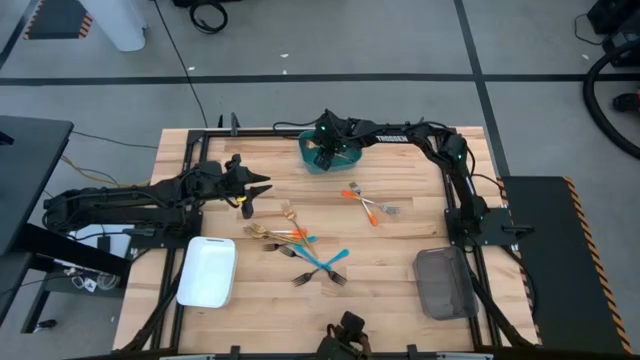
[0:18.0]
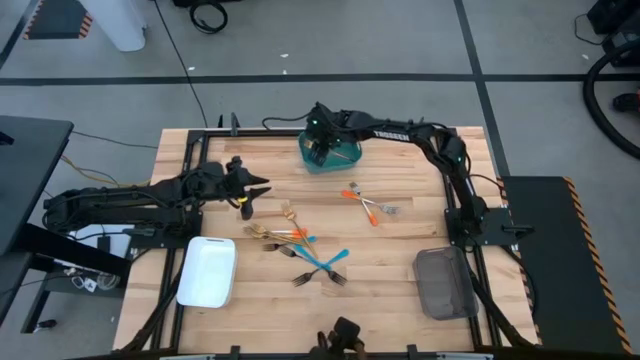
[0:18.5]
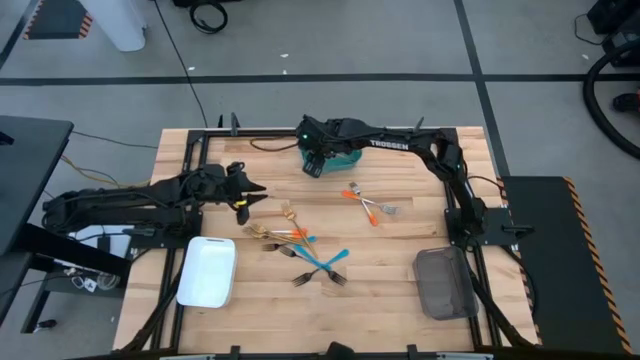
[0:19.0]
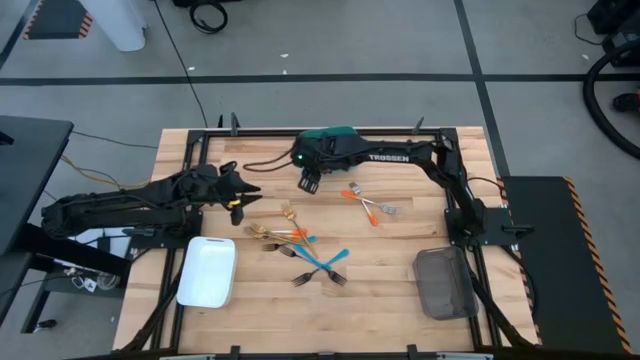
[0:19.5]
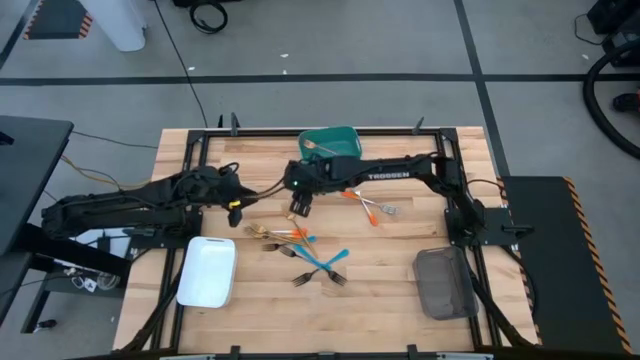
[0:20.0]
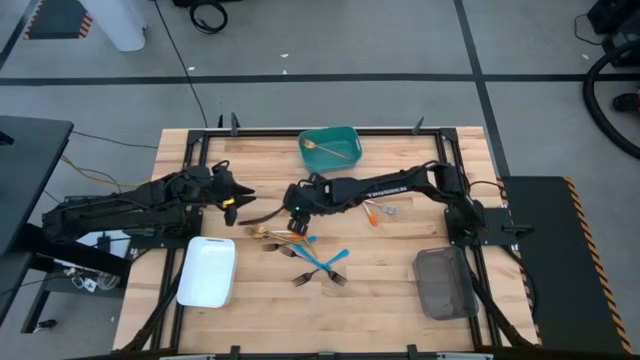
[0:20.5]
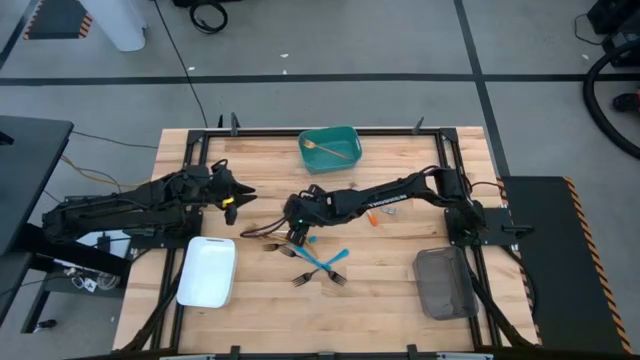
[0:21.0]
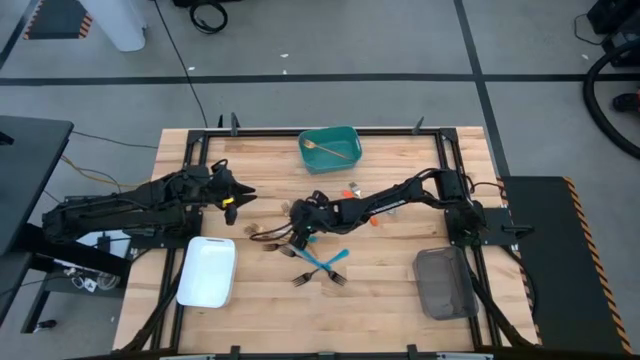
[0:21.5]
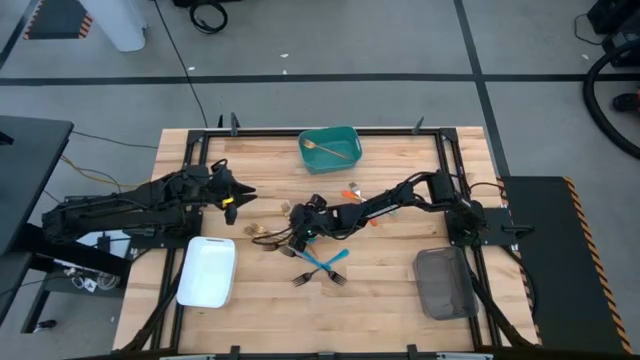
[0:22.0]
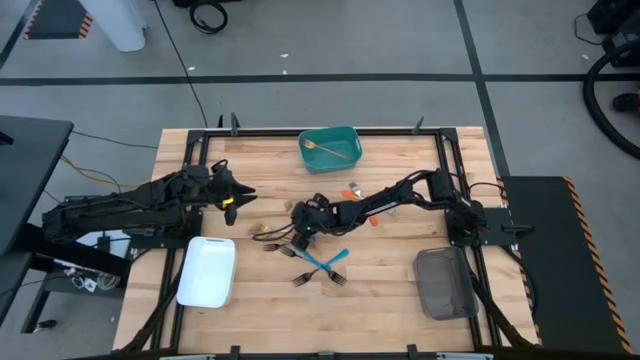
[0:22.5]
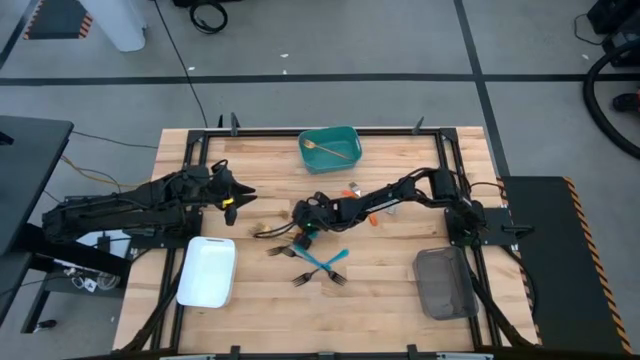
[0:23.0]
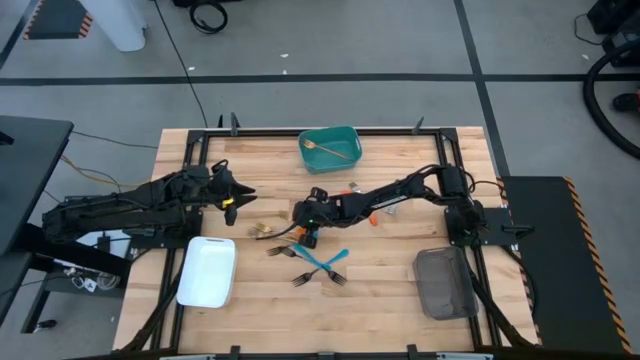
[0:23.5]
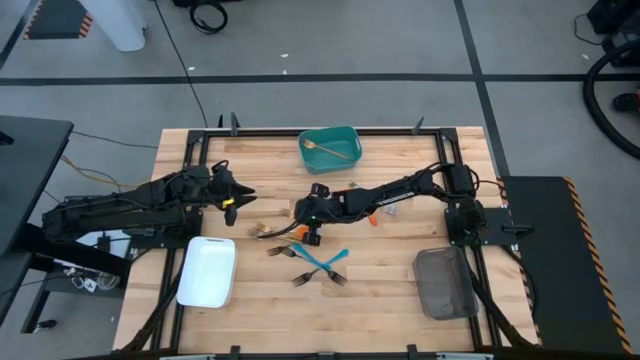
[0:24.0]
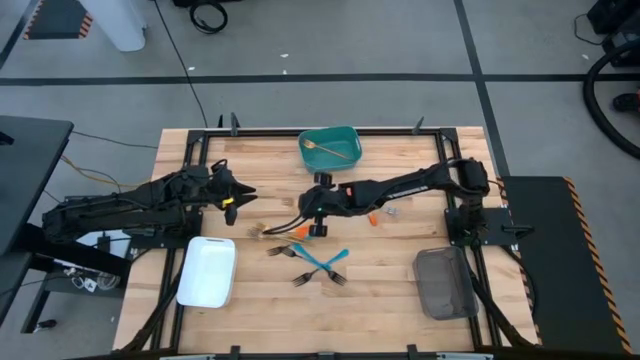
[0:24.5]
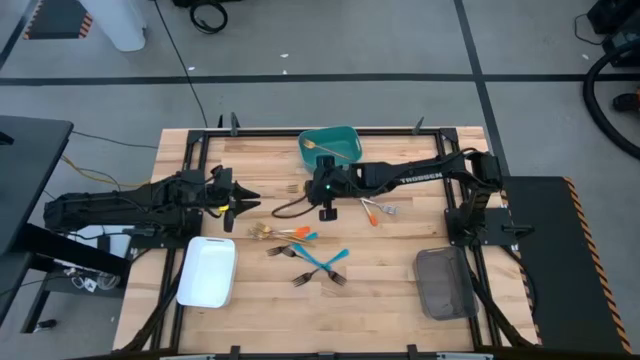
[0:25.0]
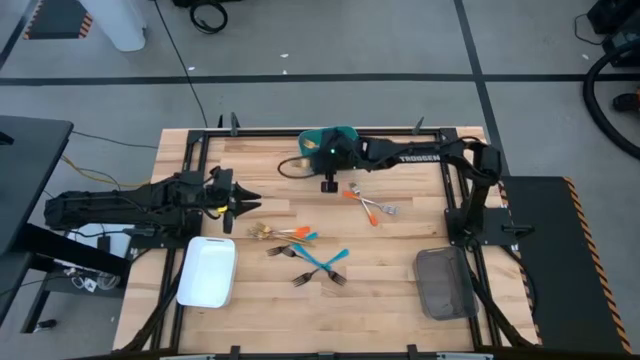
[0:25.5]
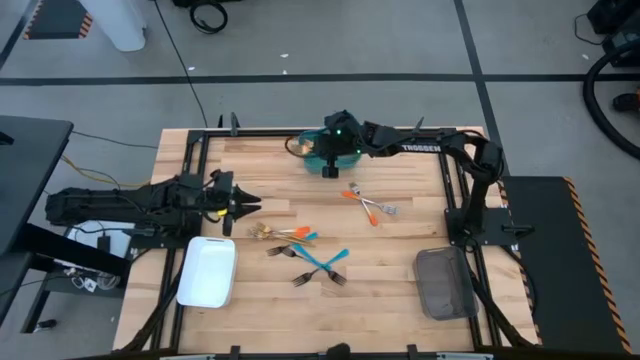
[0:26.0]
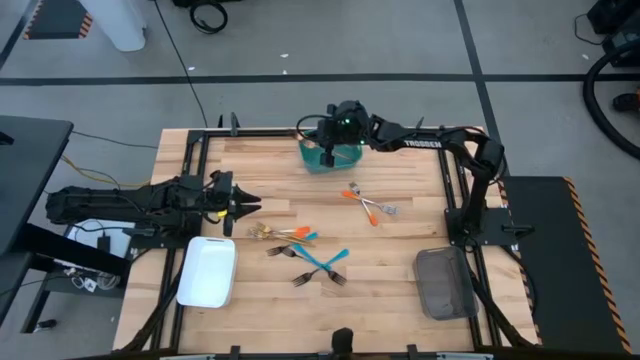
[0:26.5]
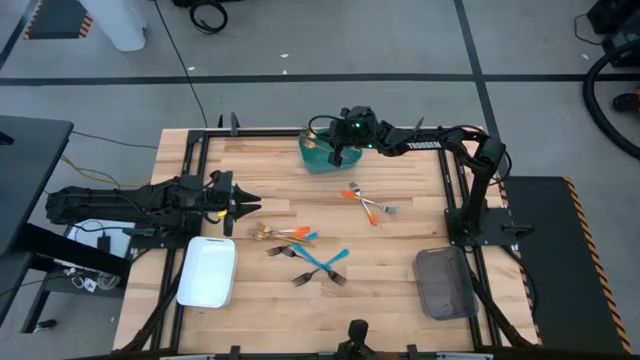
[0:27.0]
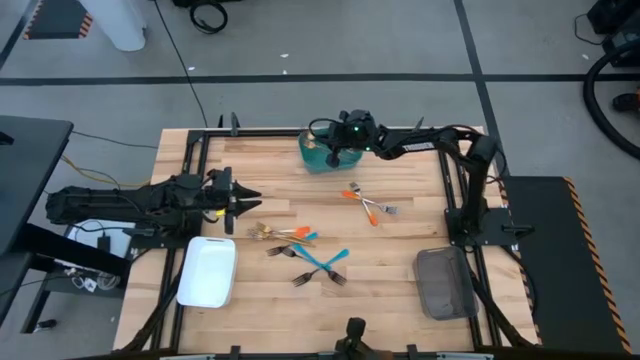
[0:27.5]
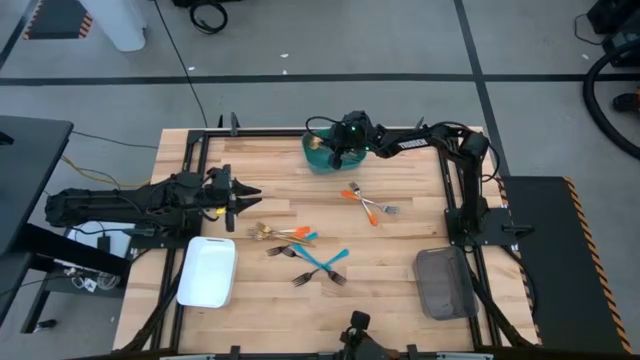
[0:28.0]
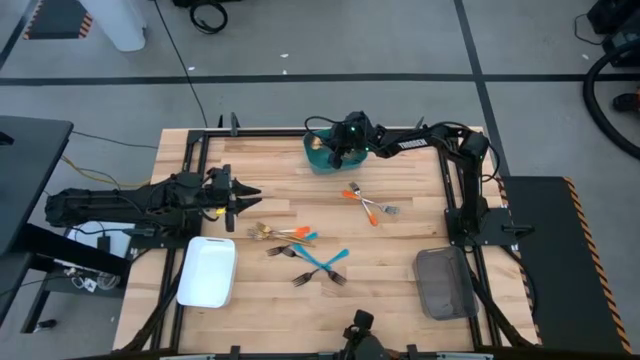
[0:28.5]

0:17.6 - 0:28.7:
Task: Sort silverware by color (type)
Put the gold fork into the blue bin

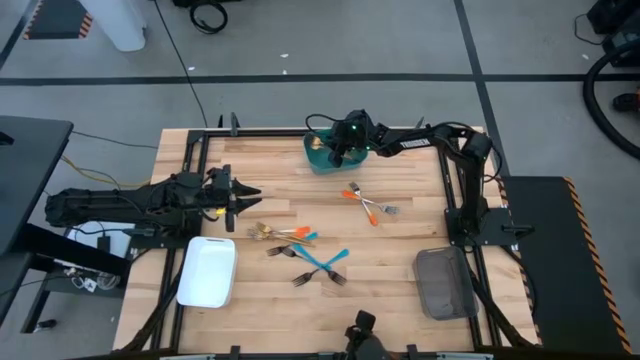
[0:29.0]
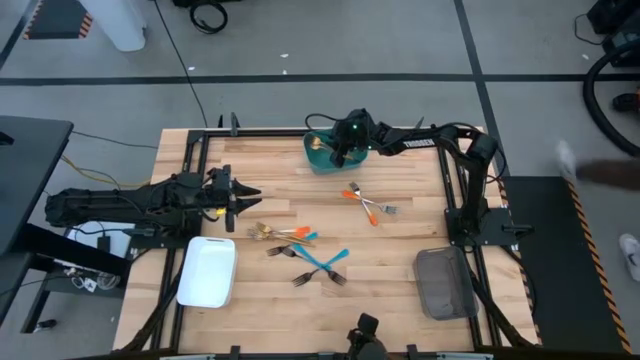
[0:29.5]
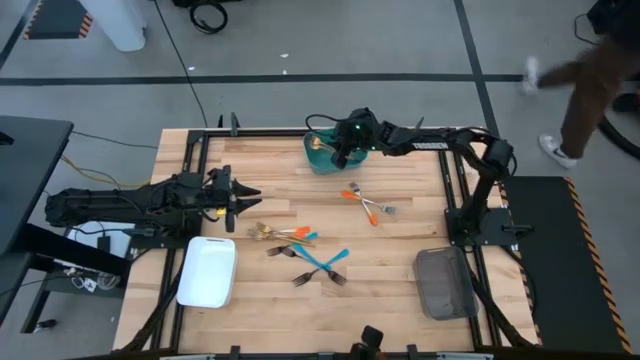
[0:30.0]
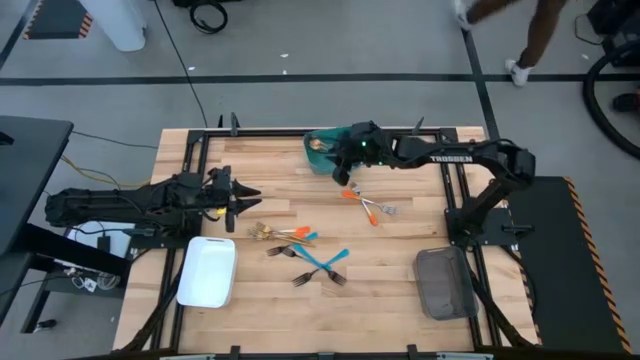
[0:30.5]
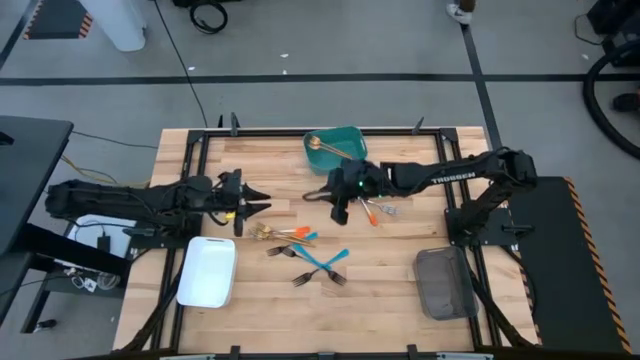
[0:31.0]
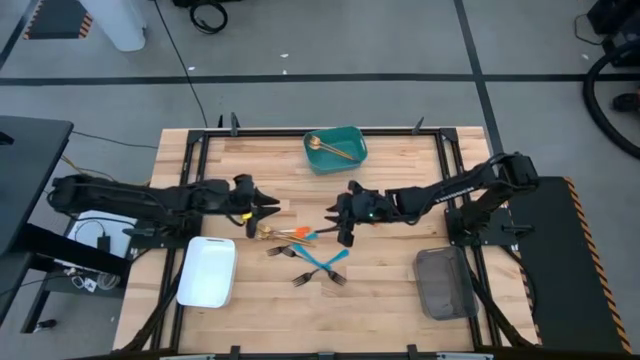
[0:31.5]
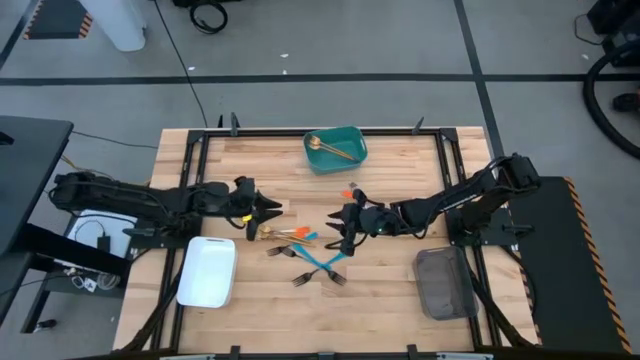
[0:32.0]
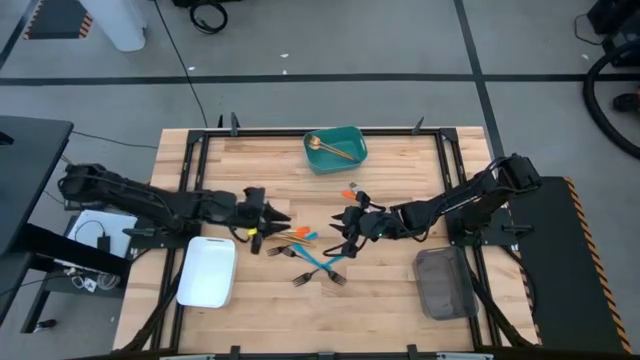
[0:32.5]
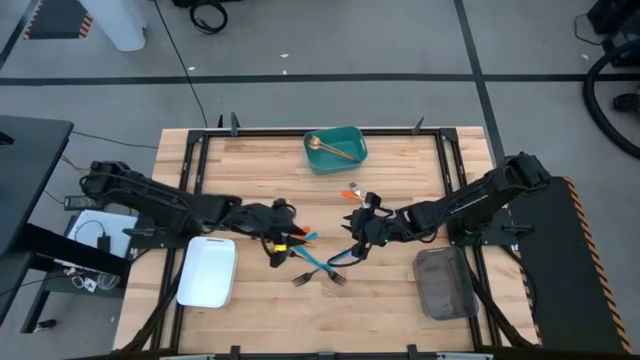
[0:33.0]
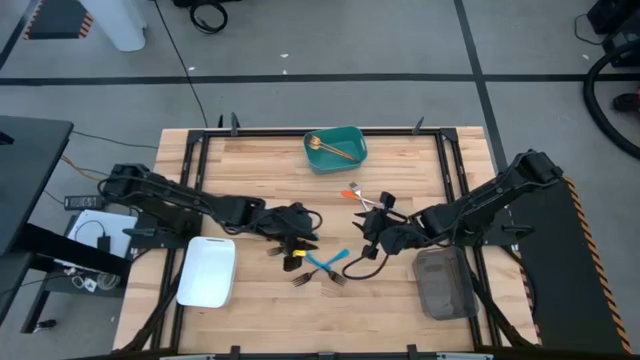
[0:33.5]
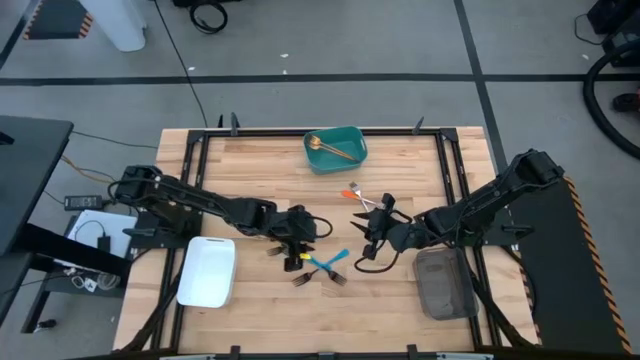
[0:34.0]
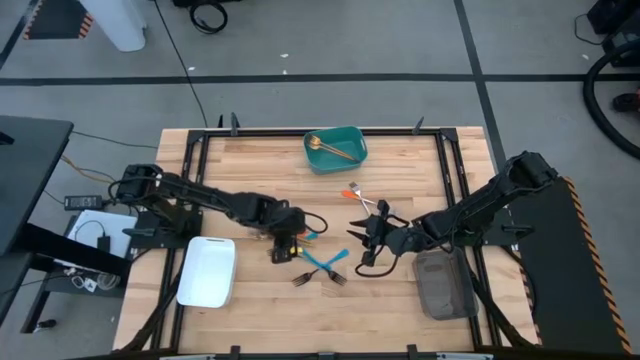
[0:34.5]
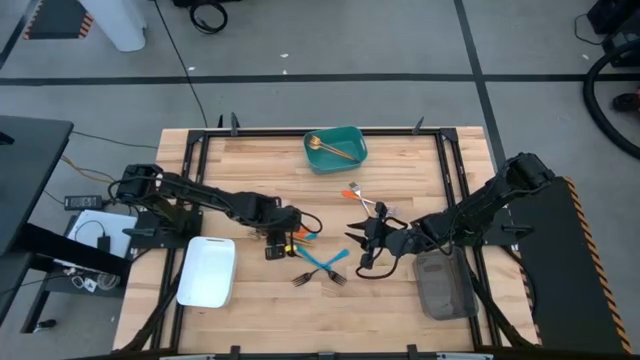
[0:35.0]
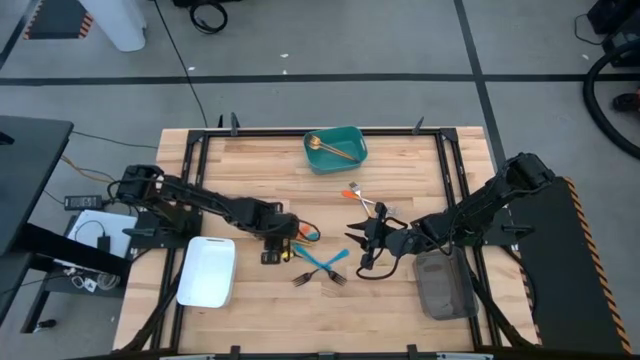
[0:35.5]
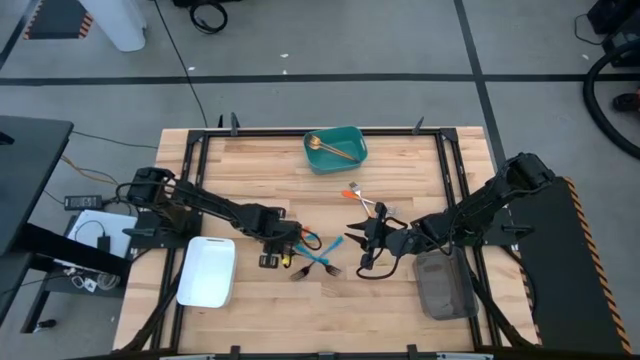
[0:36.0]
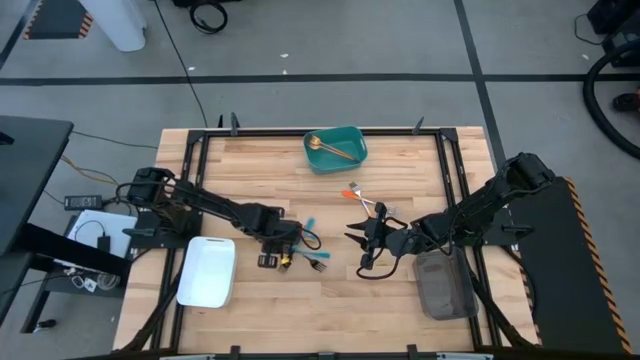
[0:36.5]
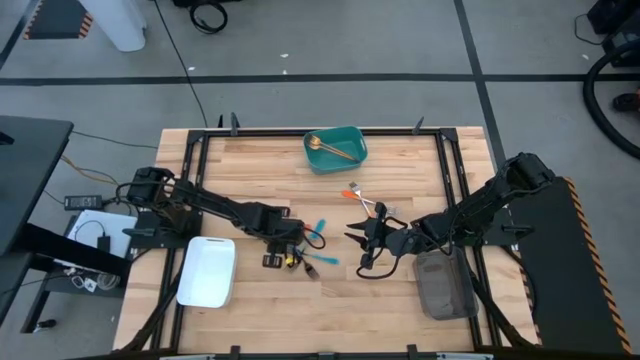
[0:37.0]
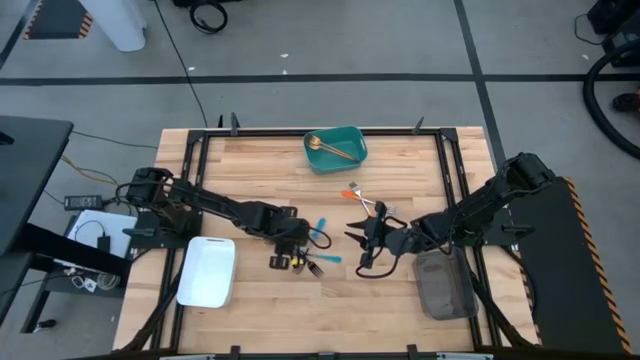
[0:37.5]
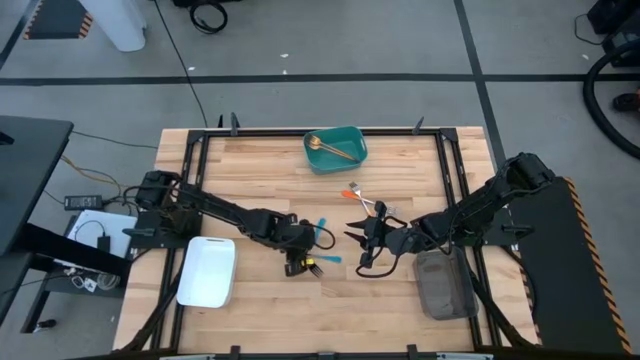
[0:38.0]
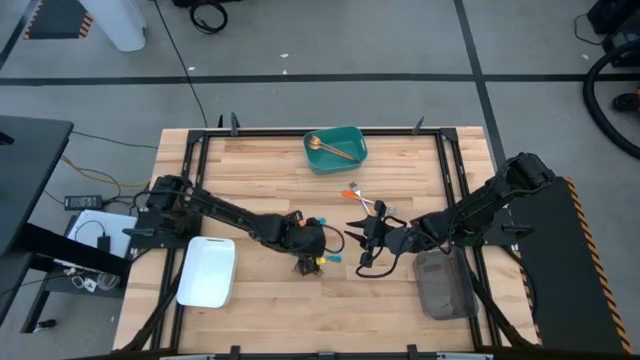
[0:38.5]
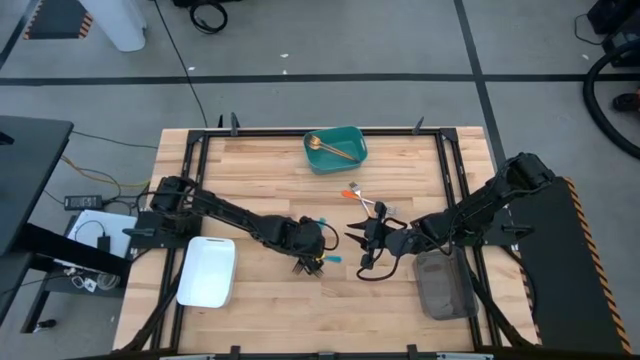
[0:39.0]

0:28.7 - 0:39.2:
Put the blue fork into the white bin
